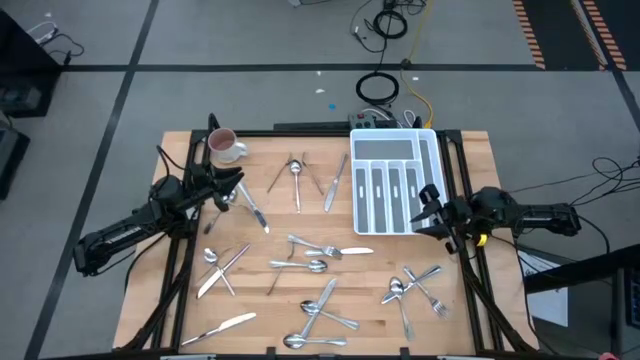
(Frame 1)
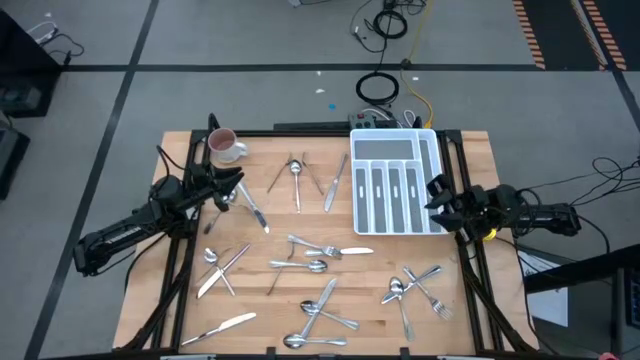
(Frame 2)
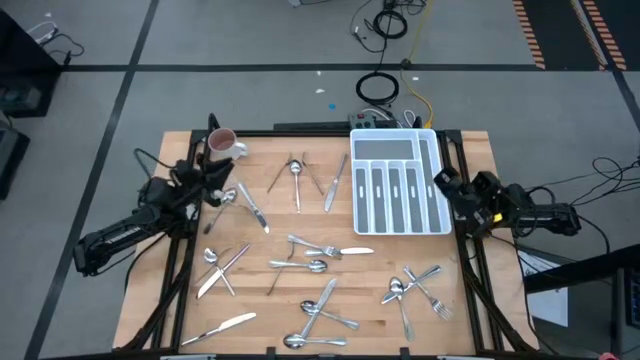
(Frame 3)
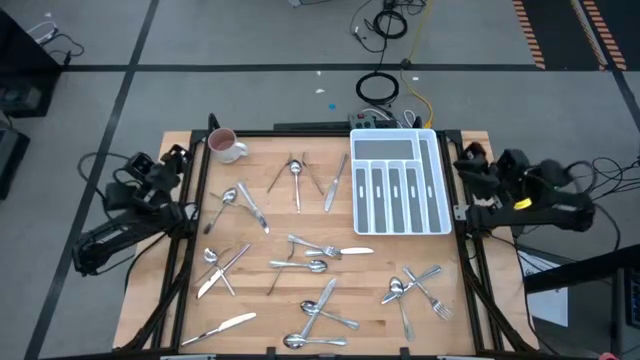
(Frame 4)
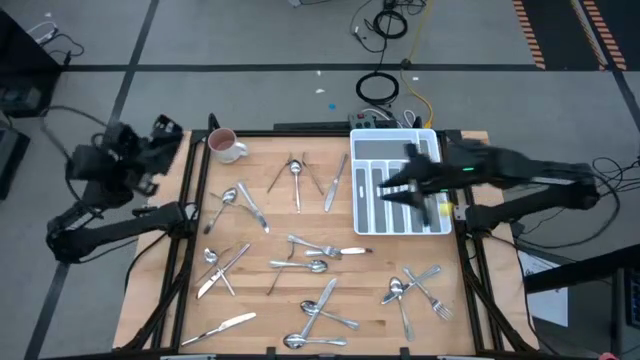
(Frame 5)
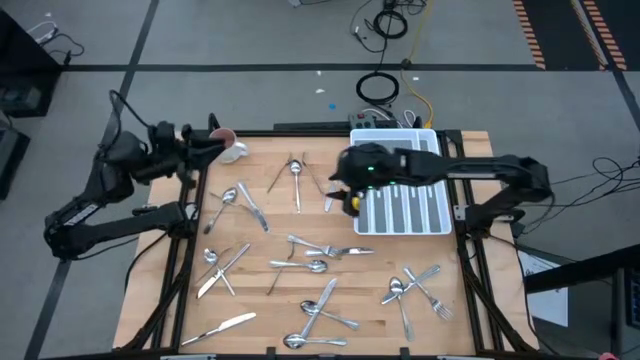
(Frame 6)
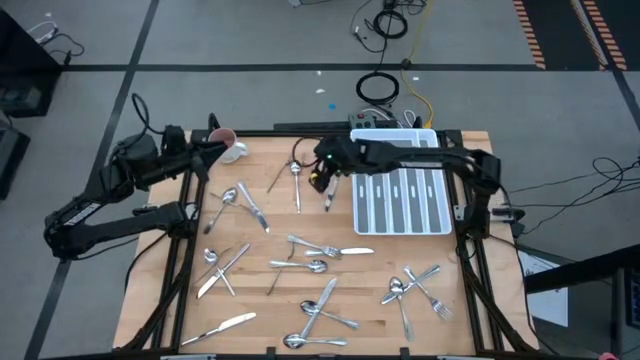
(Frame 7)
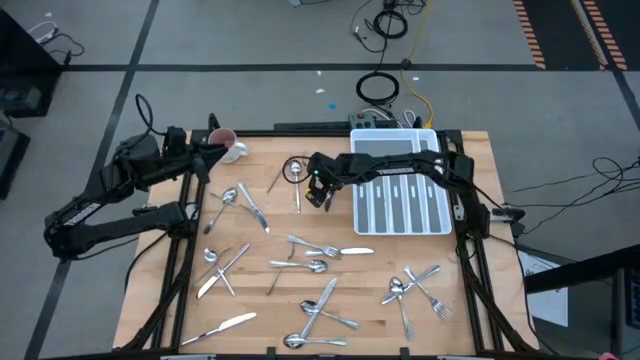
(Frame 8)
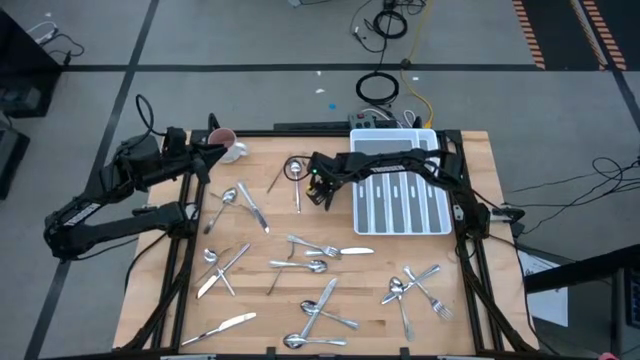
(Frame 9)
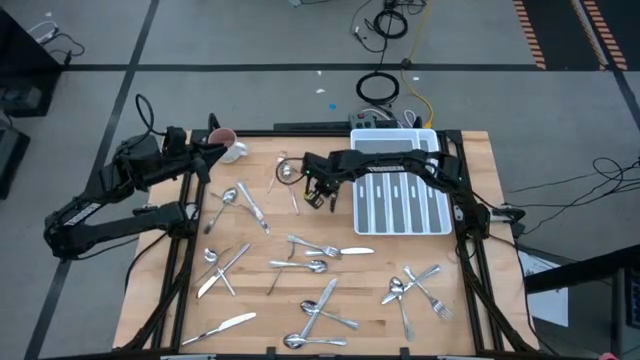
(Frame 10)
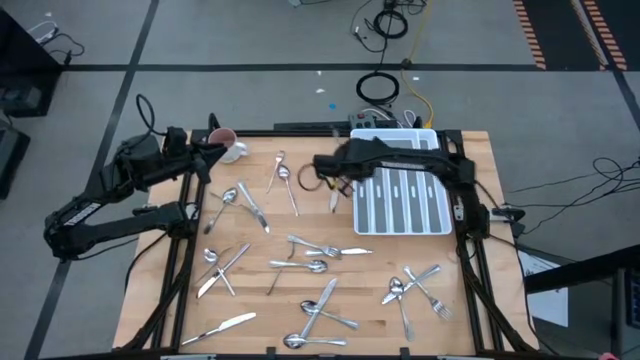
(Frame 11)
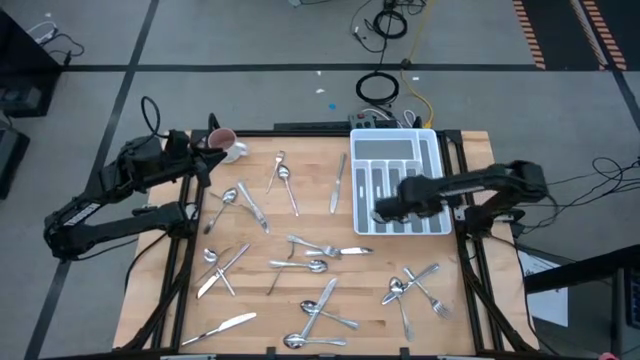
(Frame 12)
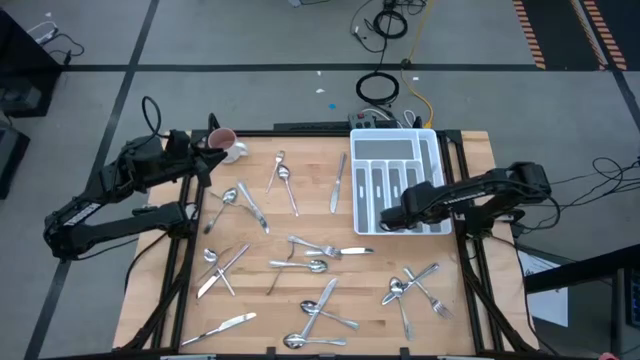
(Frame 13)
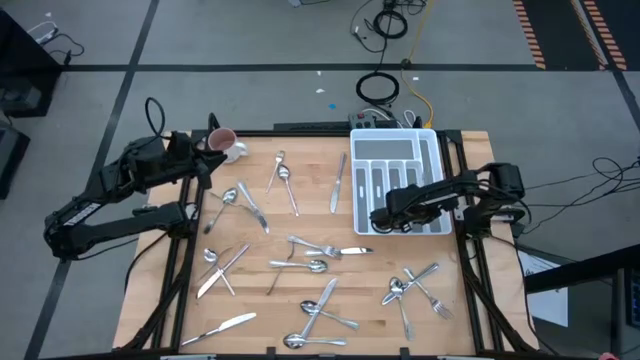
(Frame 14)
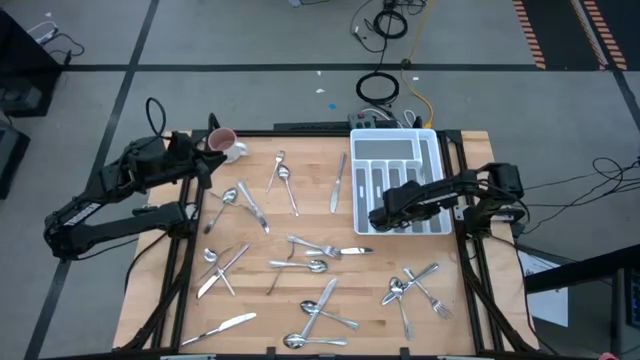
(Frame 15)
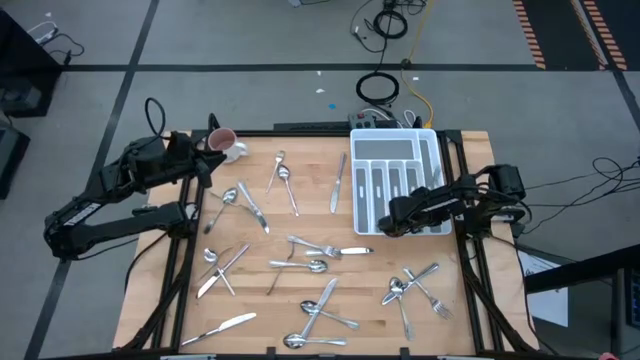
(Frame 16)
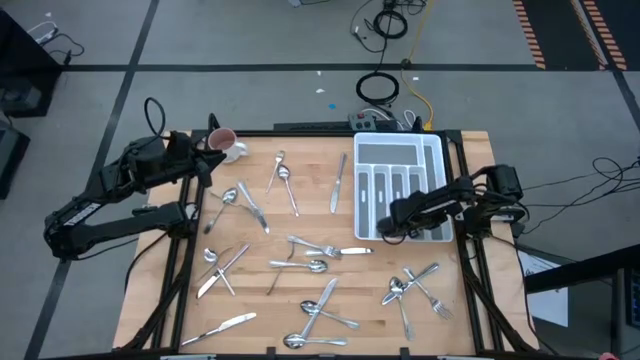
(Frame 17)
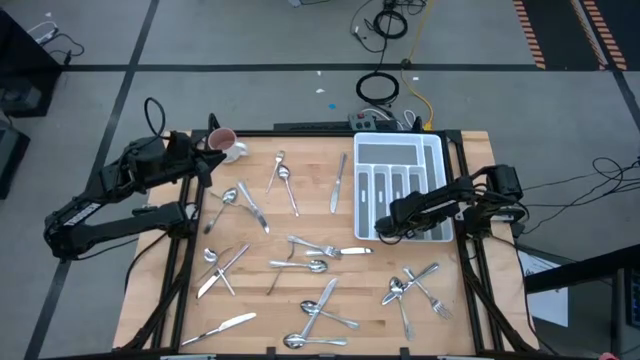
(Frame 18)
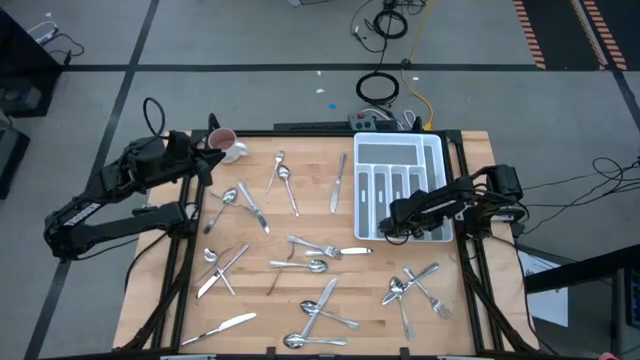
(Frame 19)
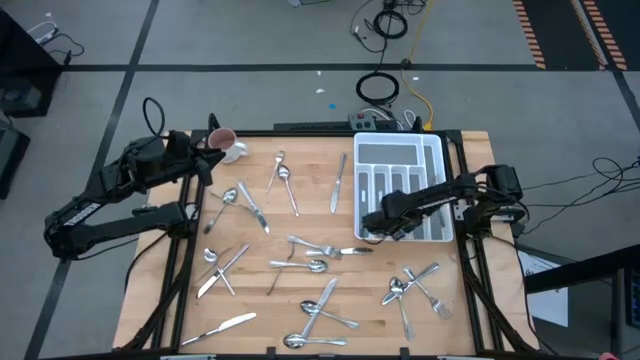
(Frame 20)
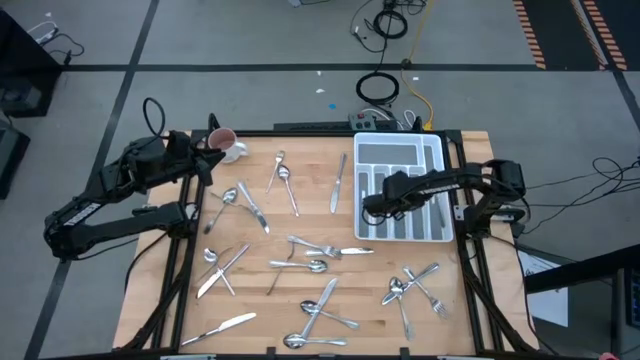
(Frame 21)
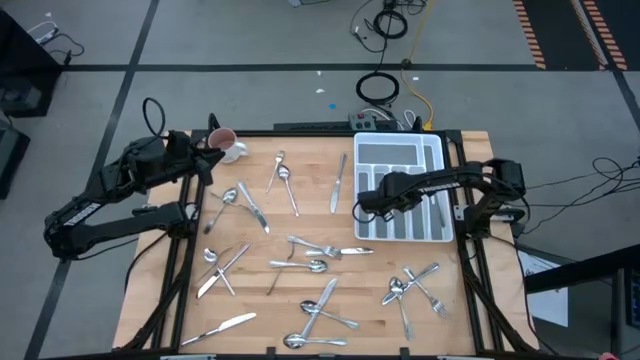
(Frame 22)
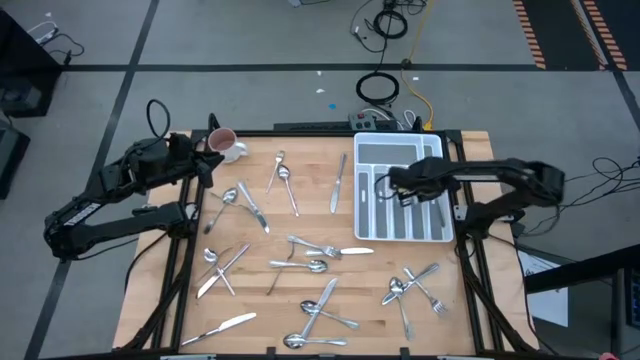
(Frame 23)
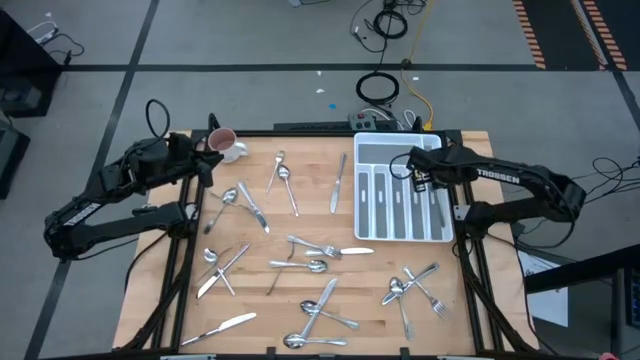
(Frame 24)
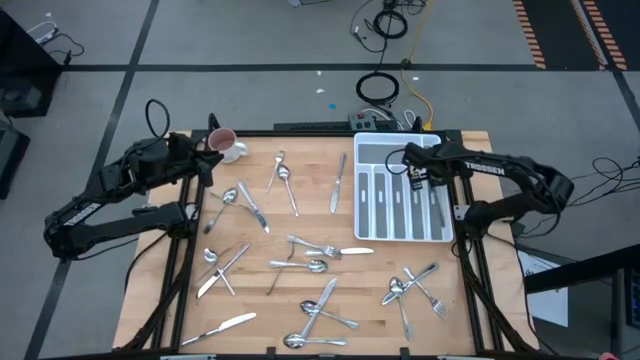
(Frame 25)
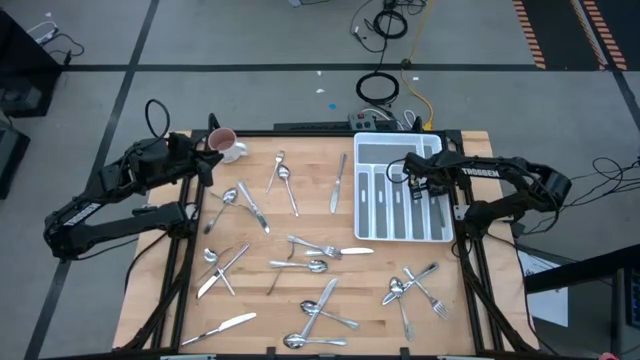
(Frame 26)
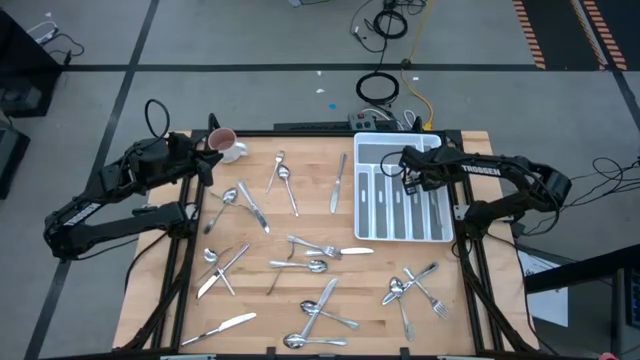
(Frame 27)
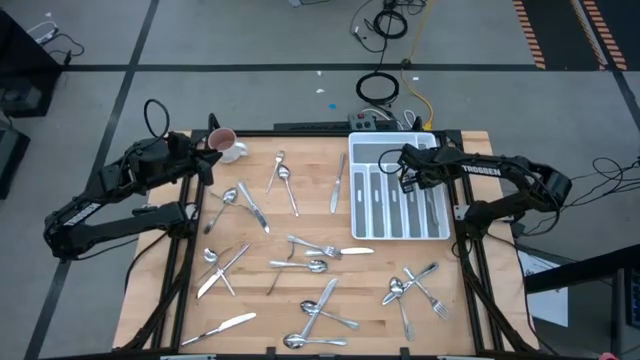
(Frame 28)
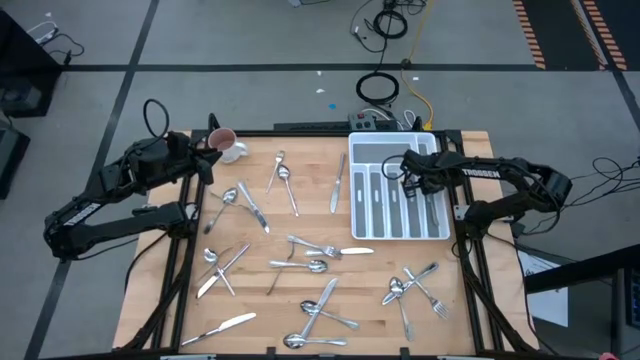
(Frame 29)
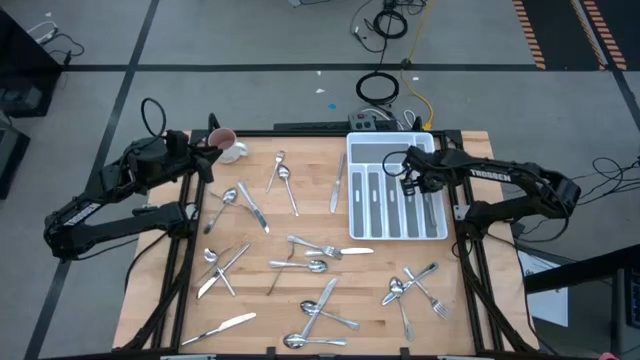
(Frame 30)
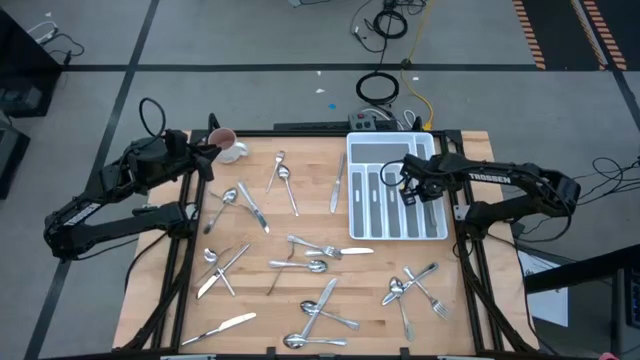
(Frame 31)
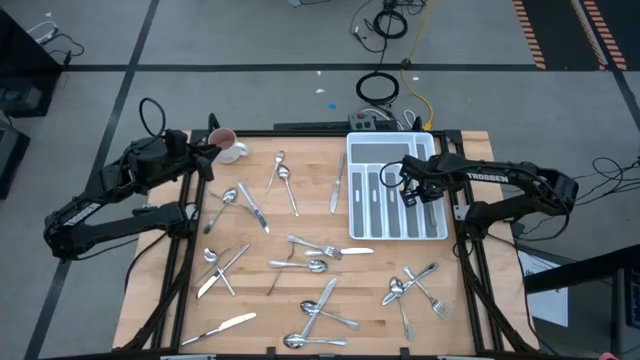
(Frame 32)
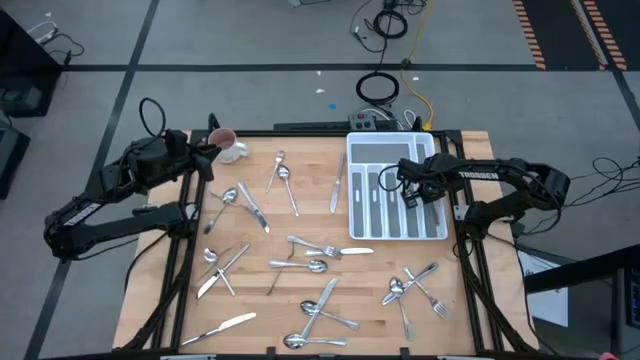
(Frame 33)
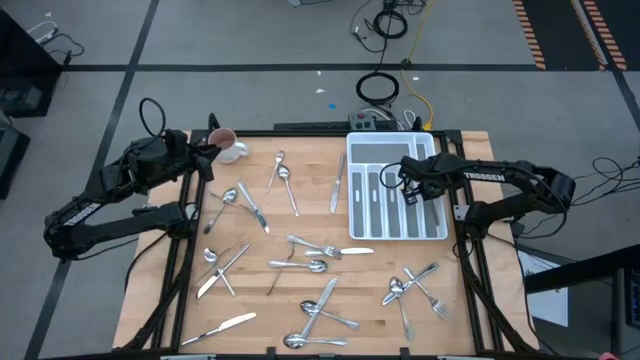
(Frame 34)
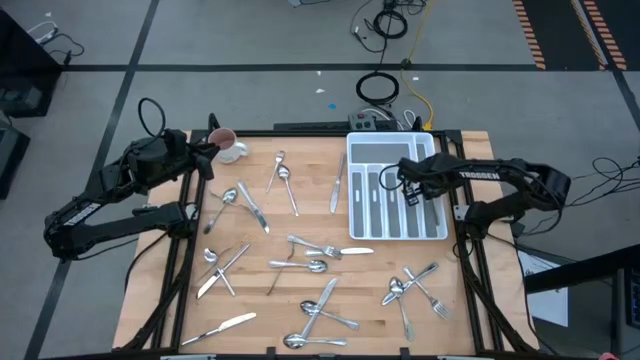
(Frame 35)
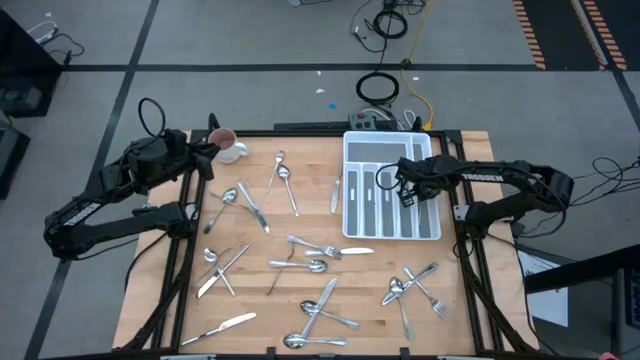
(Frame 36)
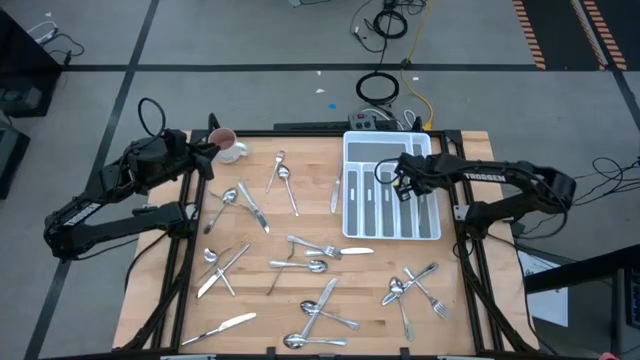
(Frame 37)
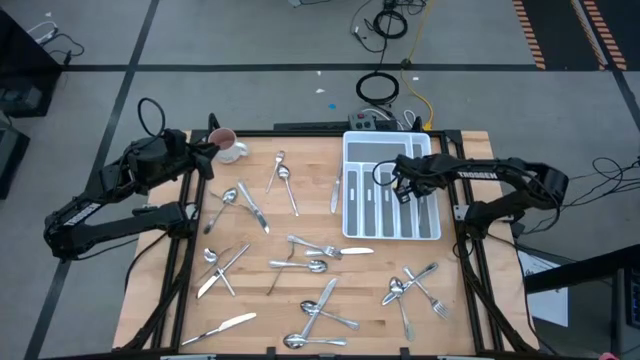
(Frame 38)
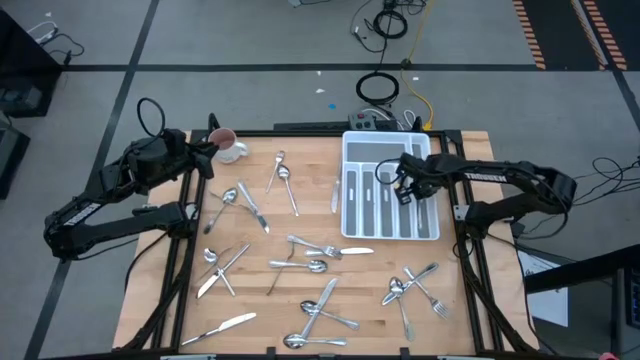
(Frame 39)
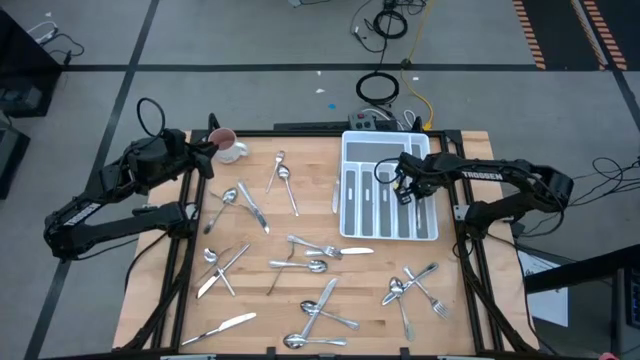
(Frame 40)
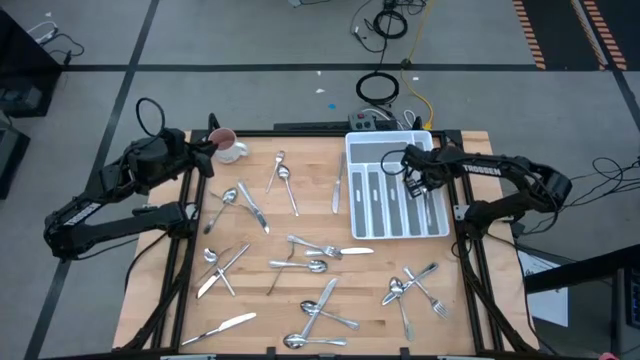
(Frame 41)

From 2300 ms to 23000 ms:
Task: Sort silverware
Put the fork in the right section of the silverware tray
